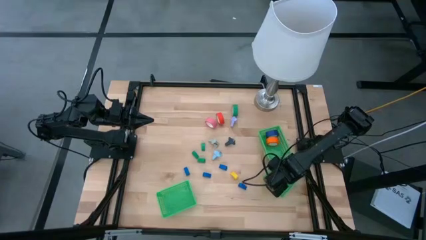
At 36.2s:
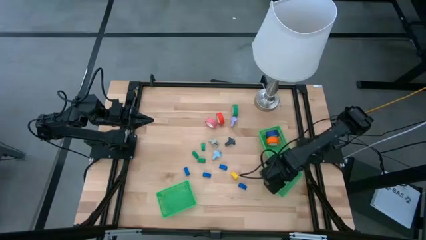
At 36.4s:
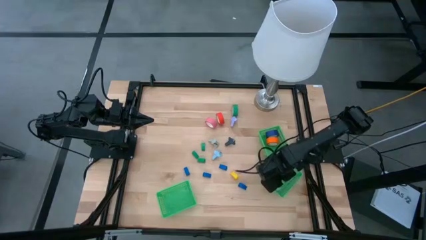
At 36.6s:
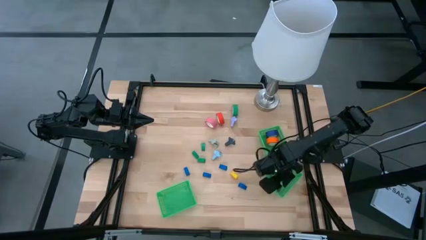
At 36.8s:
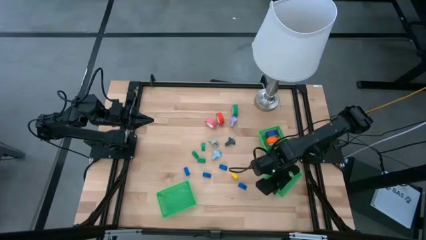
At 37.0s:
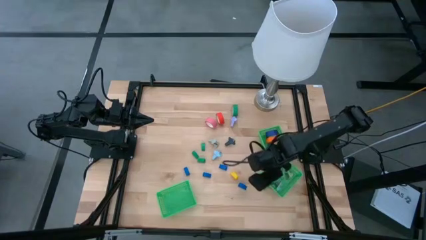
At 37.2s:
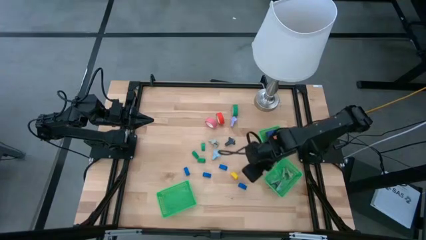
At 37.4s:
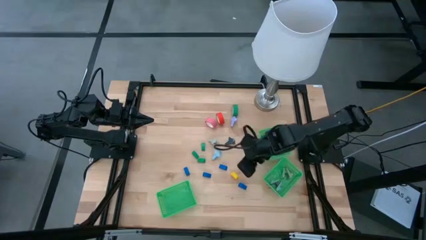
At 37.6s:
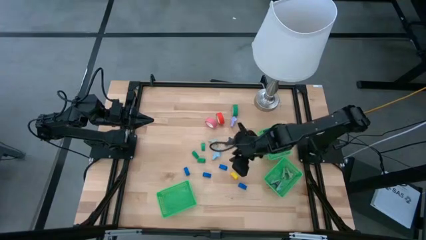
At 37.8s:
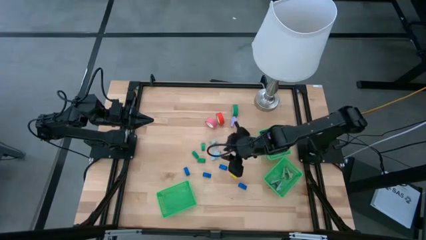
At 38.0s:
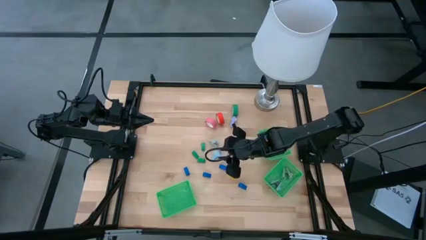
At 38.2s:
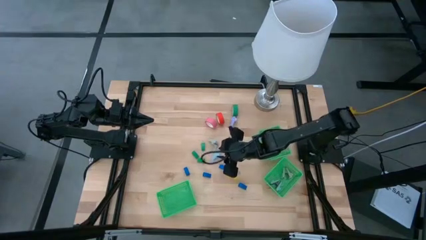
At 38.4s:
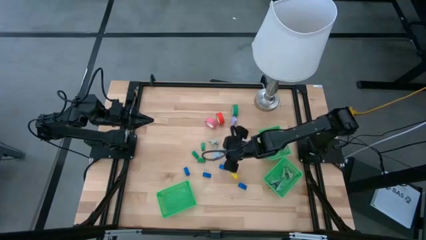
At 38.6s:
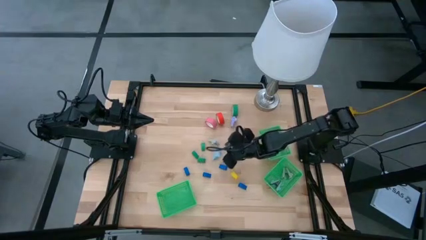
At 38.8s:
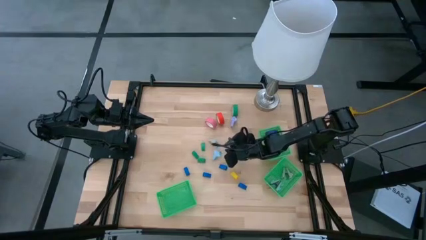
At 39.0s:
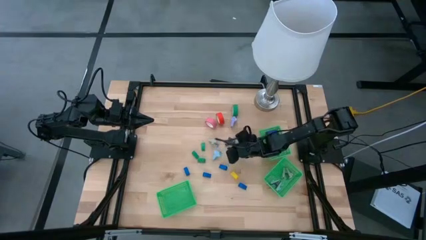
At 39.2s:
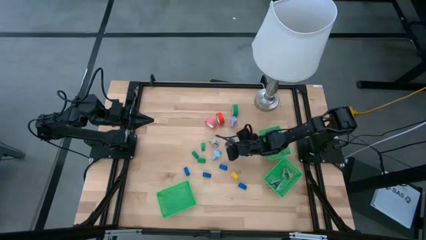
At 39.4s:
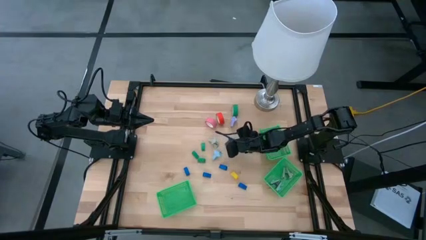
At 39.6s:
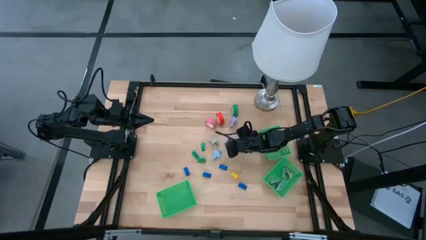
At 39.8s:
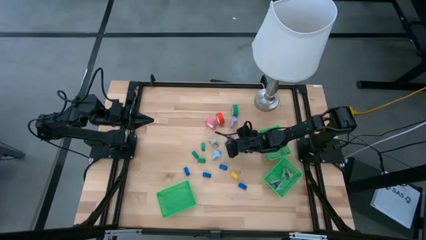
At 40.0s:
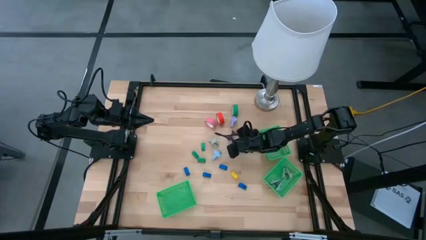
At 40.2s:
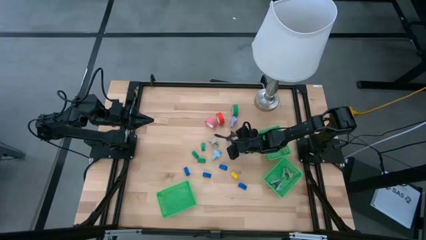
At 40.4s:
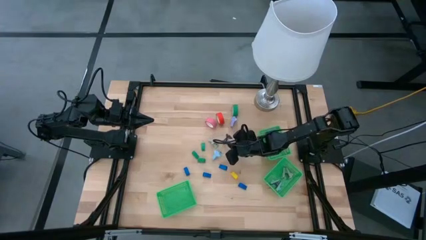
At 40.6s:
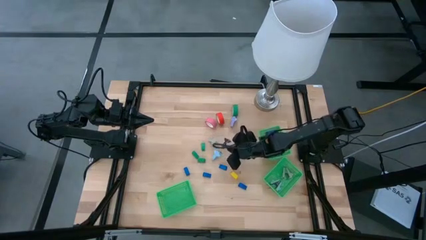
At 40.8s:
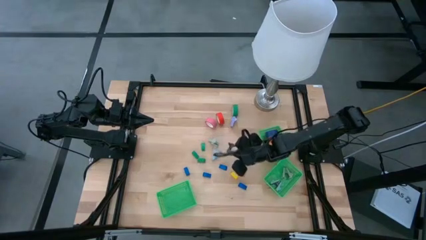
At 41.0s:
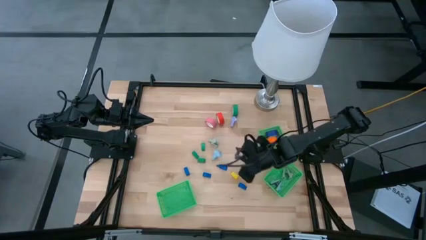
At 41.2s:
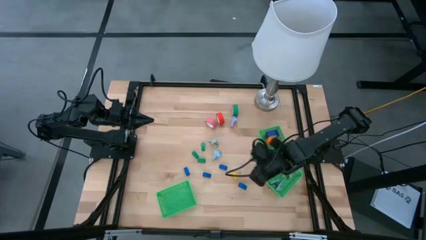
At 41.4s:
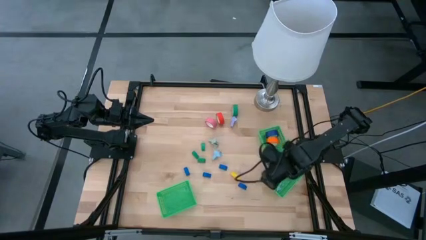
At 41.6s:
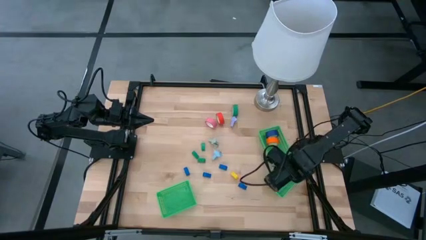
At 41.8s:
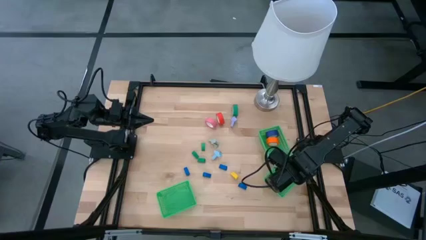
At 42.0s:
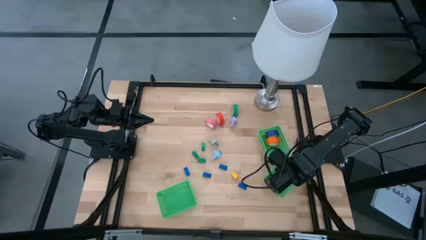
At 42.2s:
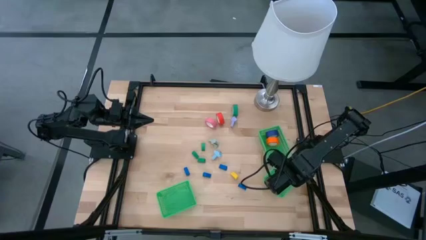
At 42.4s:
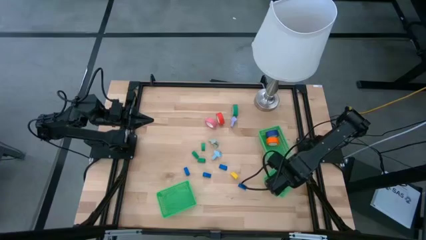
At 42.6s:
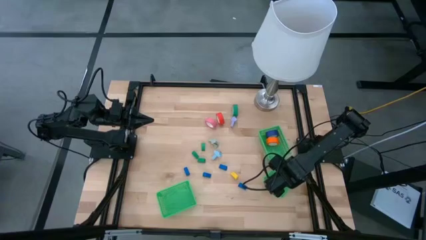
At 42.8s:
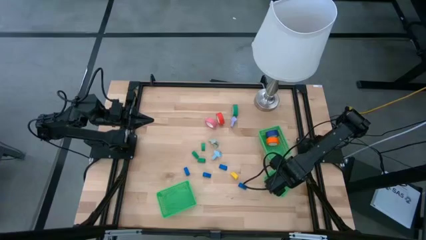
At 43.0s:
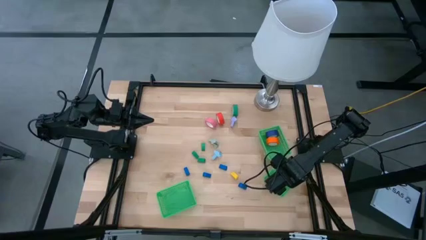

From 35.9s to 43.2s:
Task: Pick and place Stapler, Stapler remover, tape
Put the black staple remover into the bottom right green bin

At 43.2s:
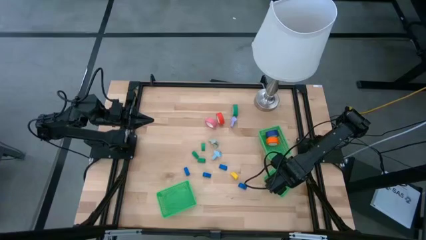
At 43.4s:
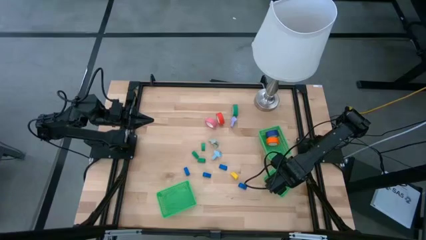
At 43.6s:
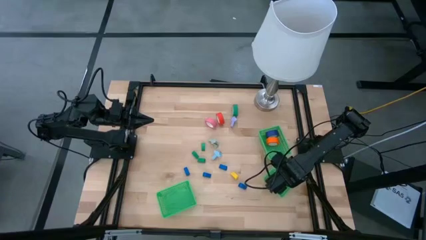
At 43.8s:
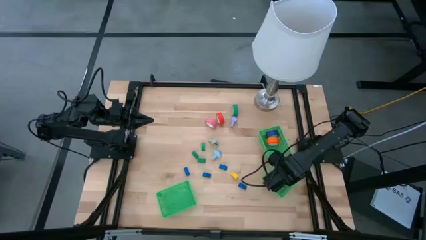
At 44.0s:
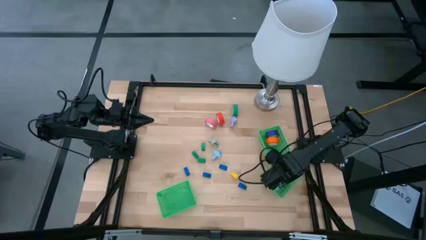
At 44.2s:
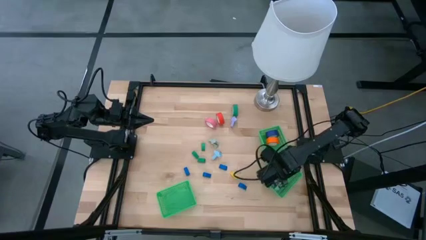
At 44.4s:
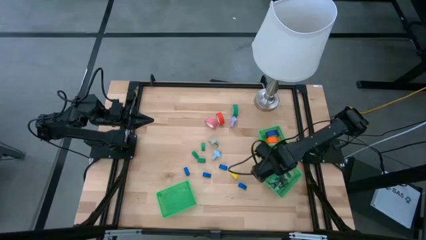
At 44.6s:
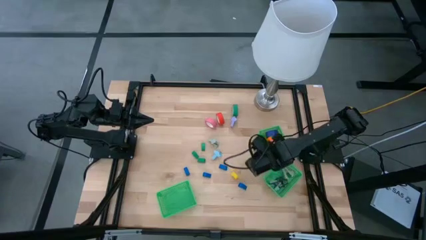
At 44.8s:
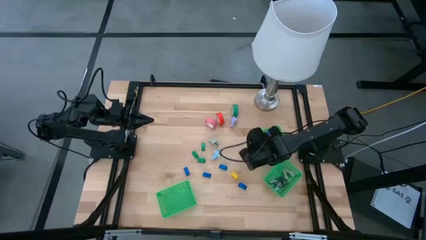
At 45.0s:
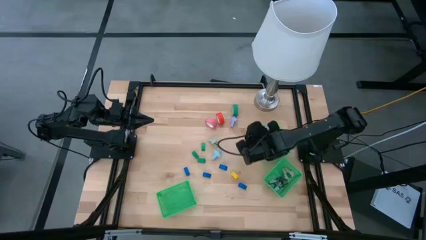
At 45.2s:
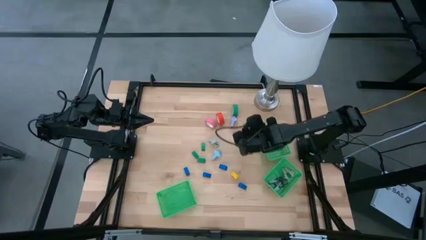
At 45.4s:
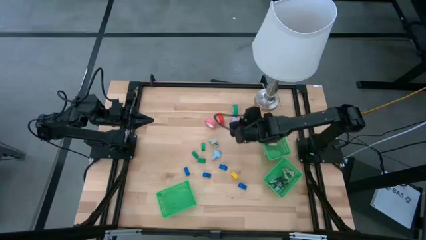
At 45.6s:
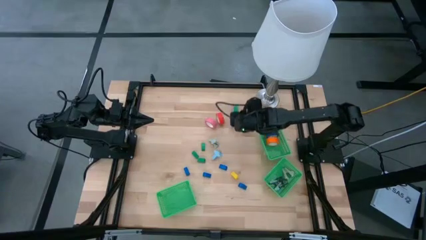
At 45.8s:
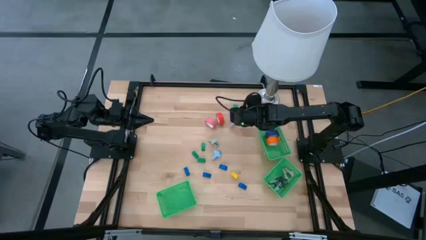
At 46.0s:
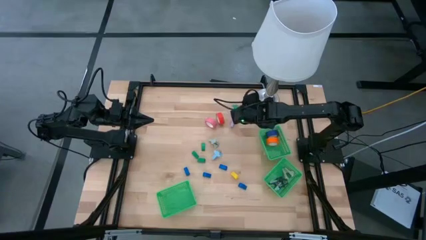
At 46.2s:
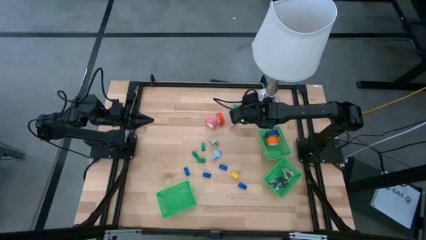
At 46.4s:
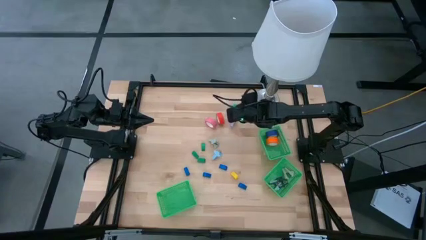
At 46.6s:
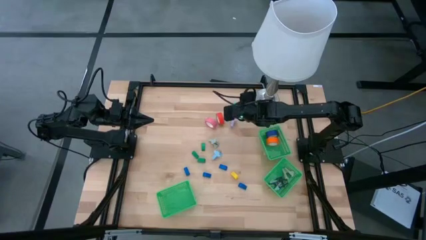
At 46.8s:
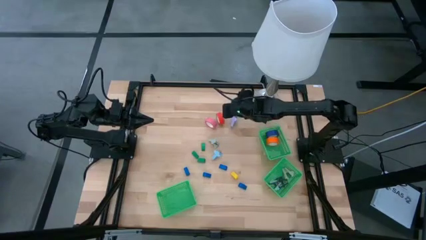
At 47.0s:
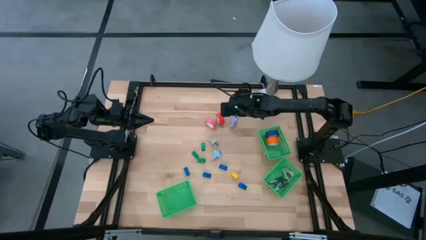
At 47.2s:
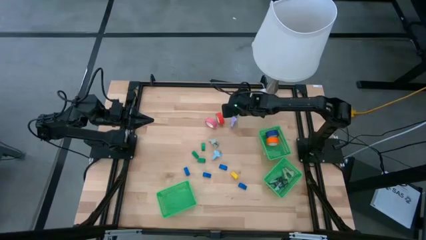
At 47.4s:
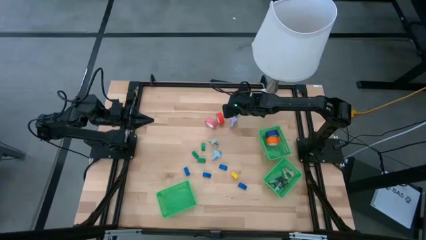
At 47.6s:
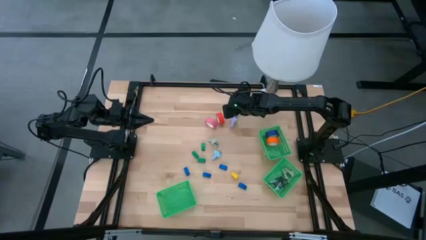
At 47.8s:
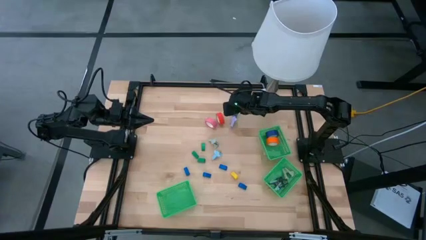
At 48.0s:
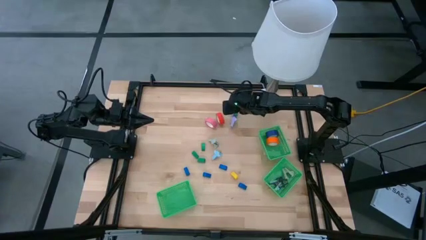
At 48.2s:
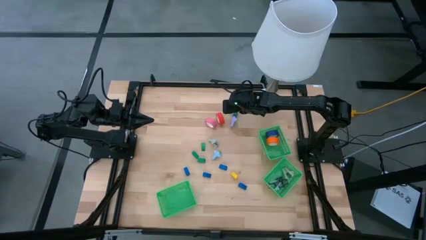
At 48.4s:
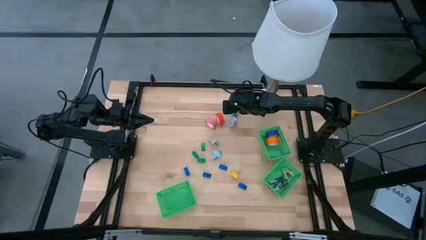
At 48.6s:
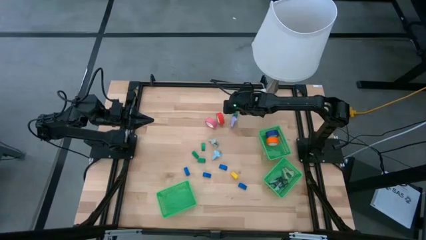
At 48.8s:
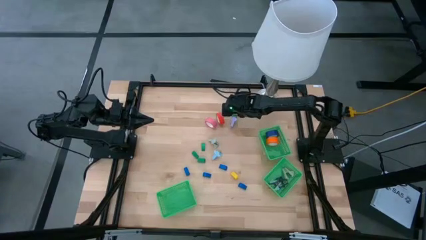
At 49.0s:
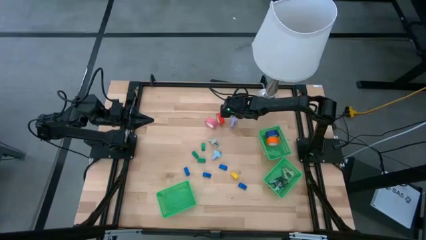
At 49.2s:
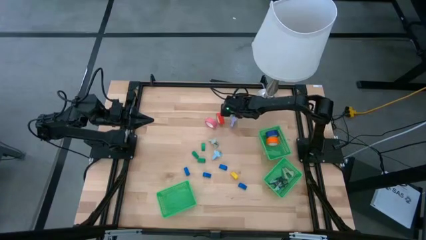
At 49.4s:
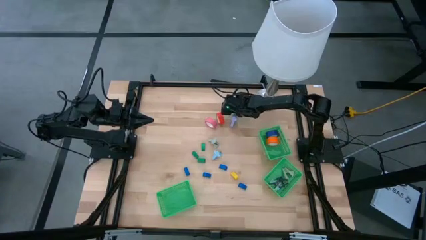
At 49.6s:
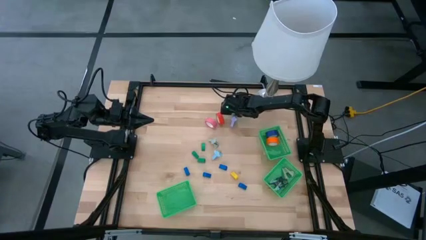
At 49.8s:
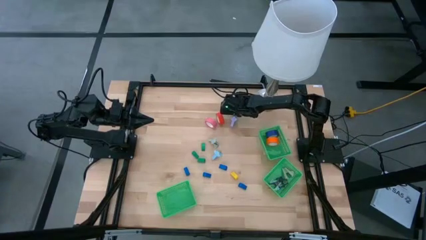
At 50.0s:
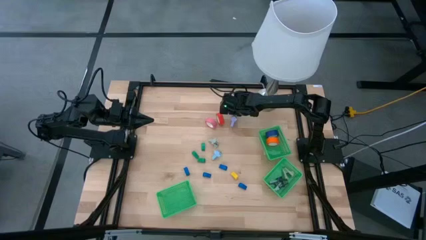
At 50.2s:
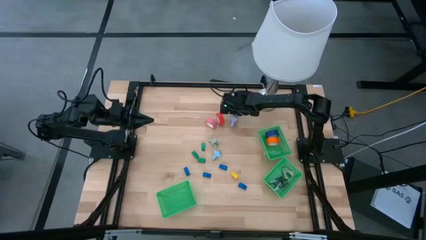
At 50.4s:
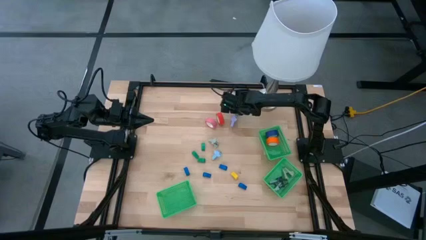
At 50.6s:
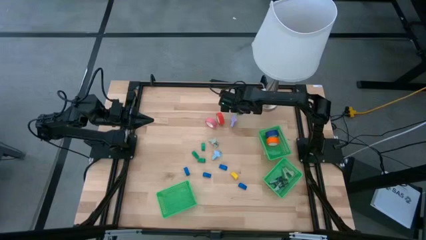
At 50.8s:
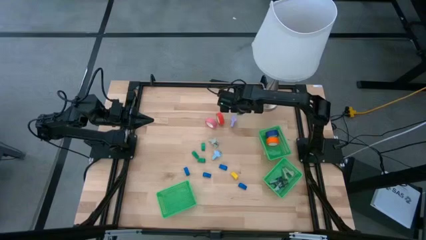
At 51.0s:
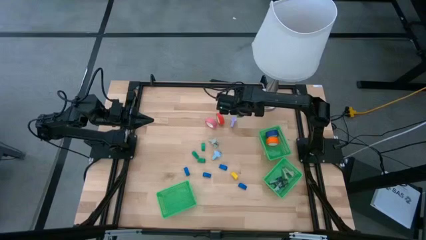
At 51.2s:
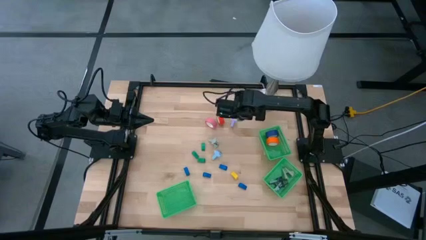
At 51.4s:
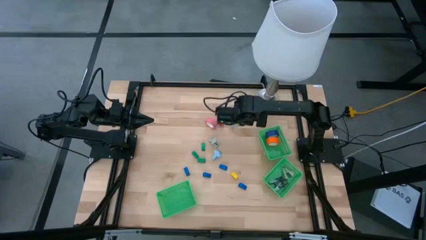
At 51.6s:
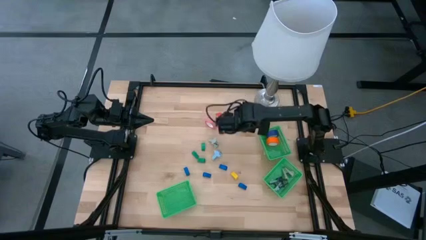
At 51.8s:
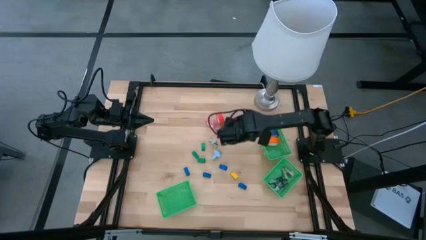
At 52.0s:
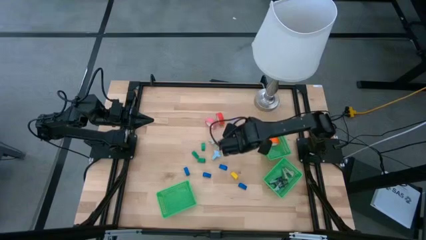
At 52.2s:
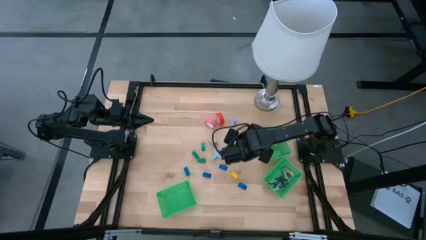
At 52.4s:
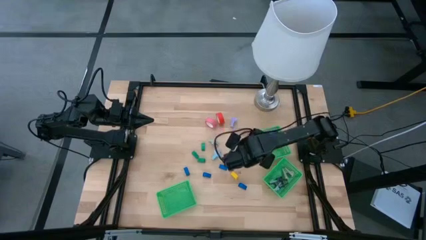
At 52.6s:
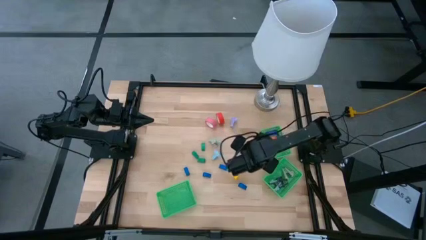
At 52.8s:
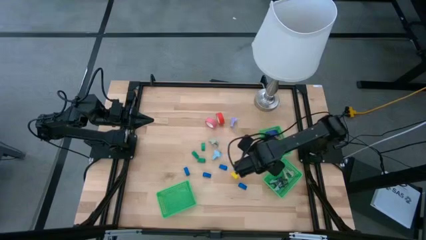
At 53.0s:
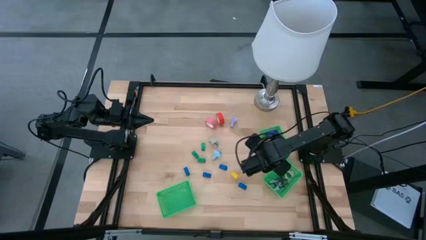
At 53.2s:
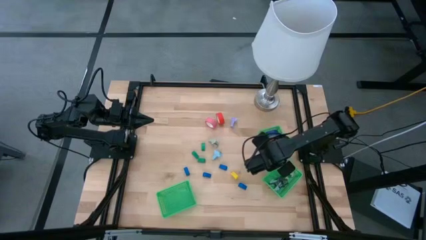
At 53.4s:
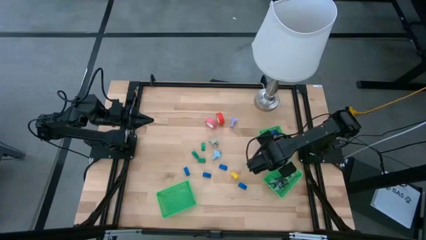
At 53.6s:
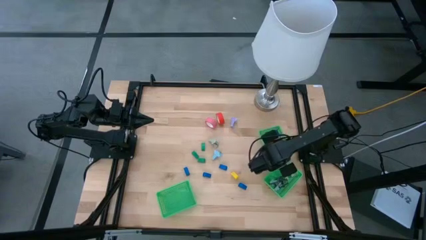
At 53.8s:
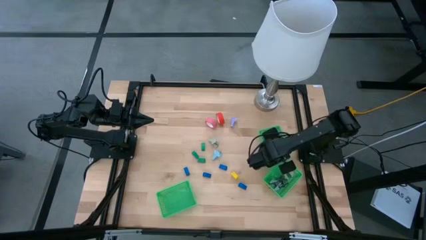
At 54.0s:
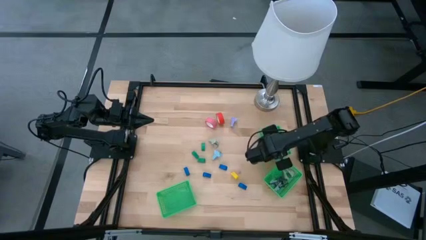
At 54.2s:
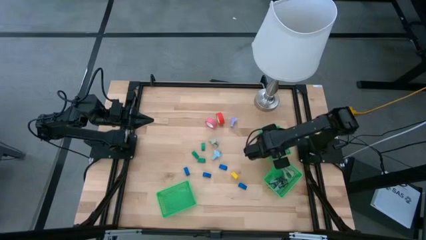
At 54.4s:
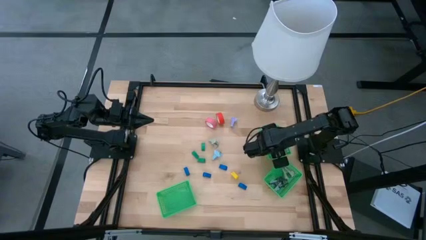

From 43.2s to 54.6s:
Put the green tape into the top right green bin
